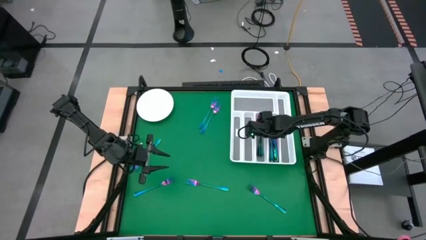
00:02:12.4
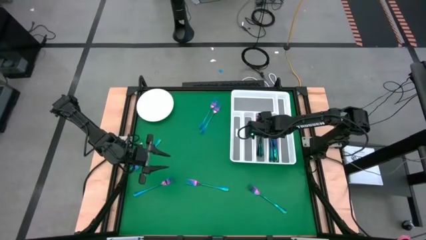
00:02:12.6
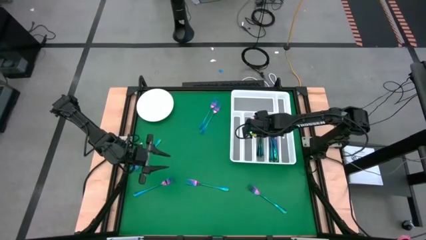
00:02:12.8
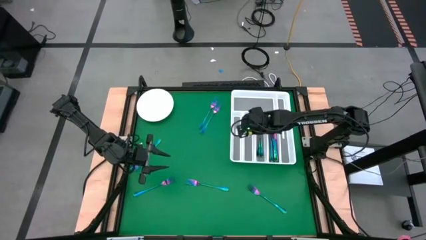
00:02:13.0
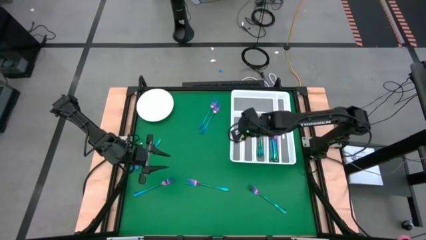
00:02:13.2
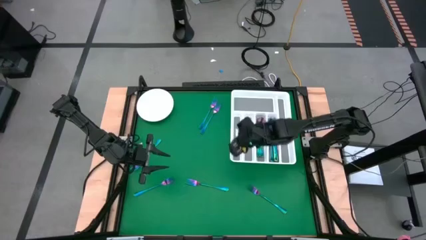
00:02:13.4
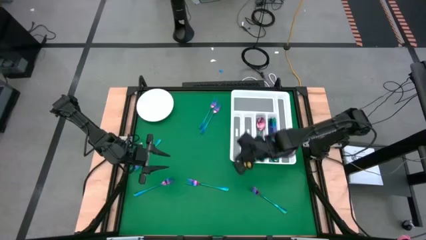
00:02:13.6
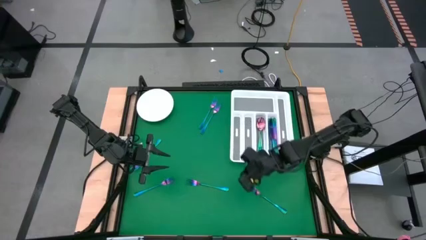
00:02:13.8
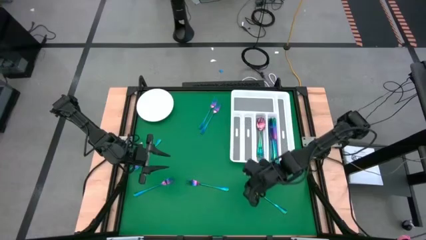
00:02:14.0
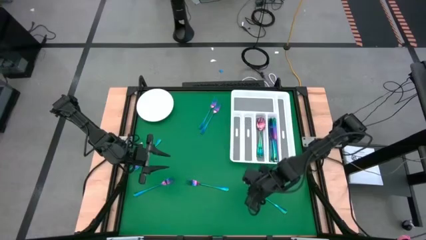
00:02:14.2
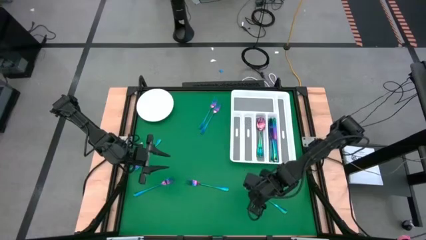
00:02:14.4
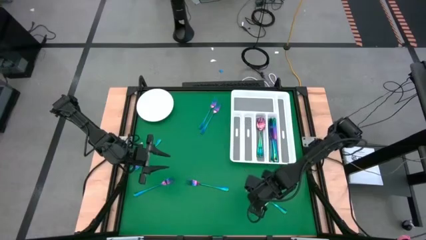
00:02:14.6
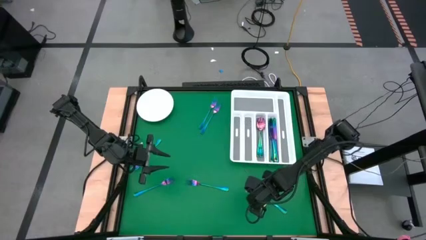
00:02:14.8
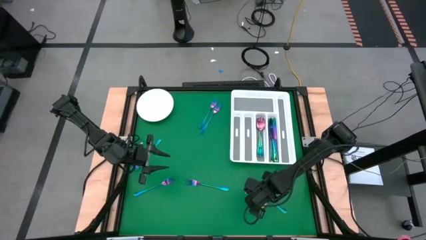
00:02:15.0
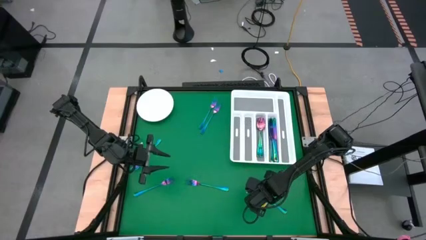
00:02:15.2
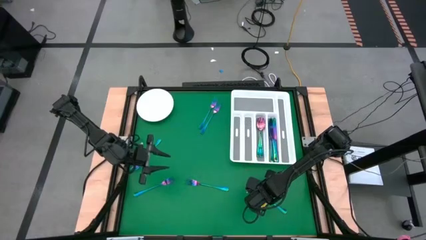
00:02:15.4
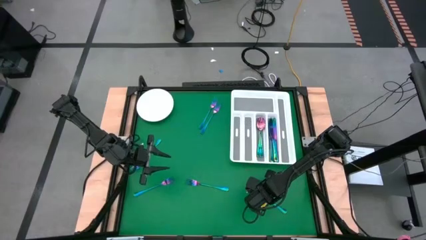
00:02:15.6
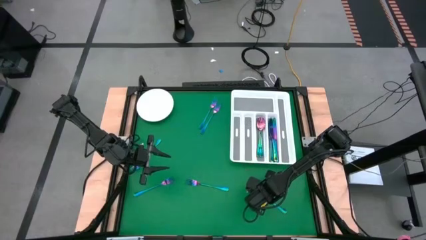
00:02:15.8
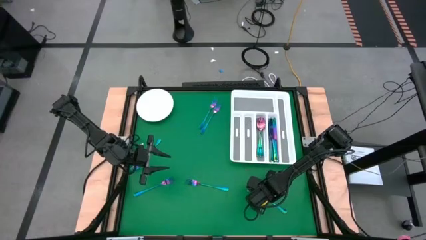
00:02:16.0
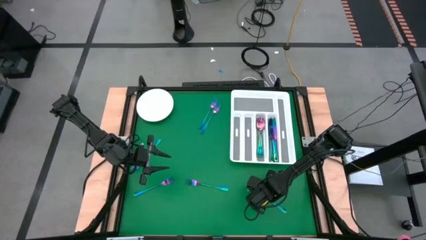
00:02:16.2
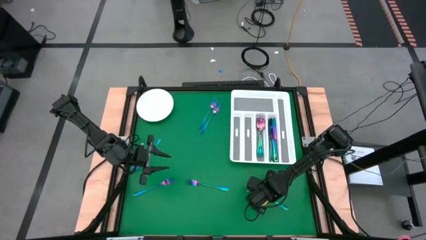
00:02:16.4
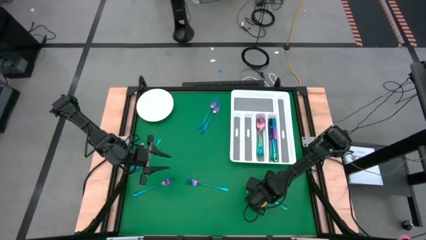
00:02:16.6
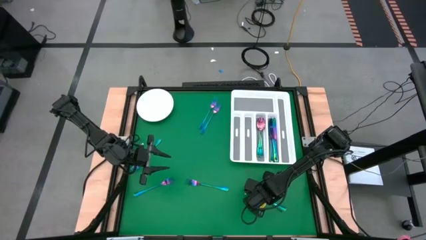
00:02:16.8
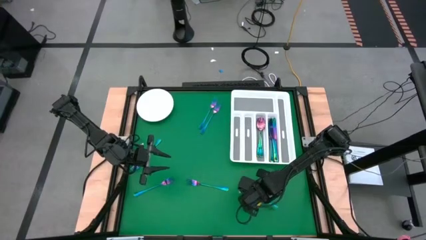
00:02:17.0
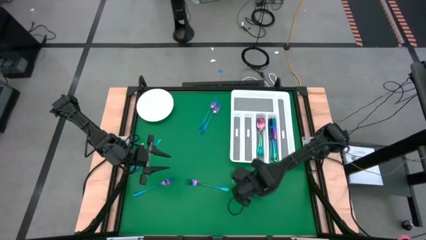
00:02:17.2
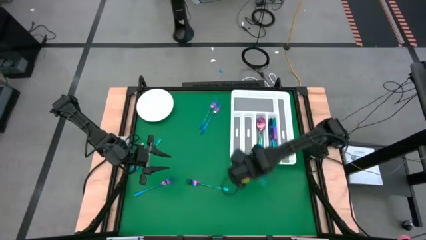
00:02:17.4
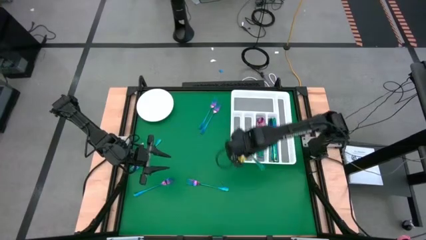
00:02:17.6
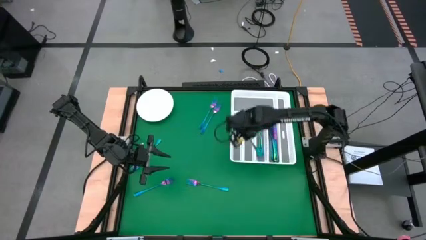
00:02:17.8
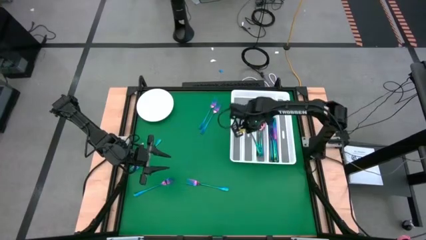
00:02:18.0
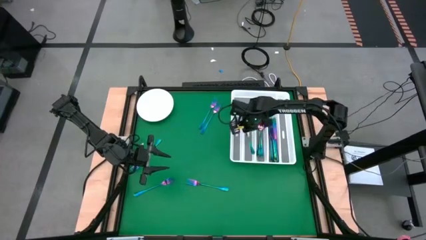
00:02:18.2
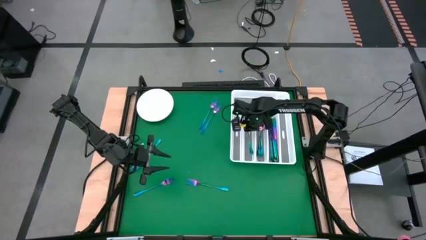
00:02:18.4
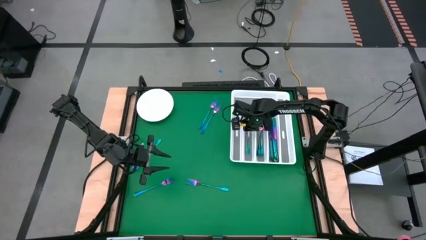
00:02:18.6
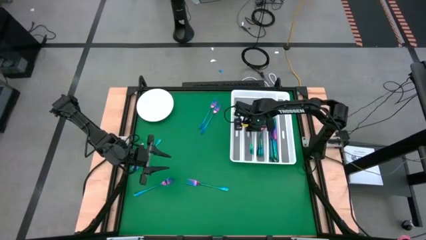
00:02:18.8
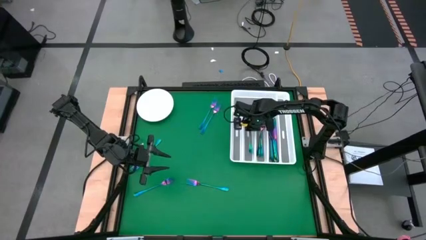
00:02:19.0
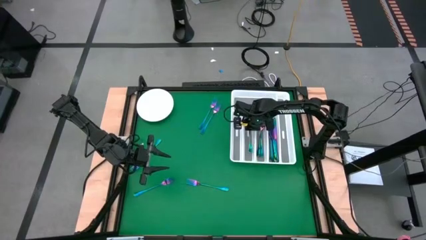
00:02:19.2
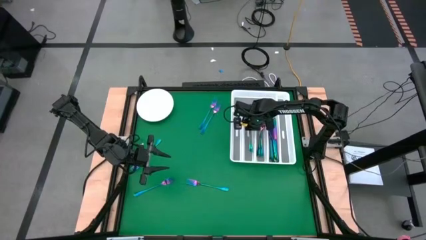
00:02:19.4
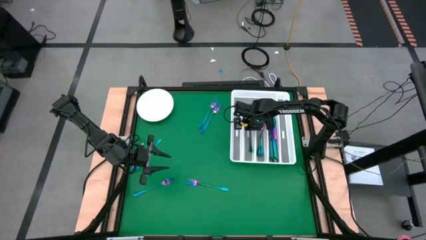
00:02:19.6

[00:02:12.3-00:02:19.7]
Task: Sort silverware
Put the blue fork into the white cutlery tray

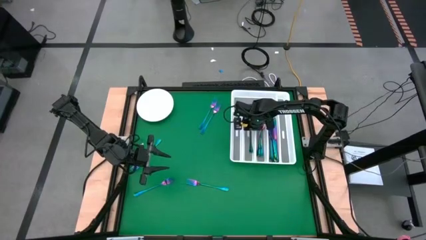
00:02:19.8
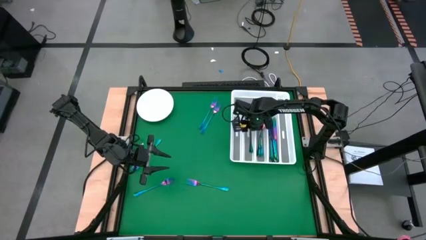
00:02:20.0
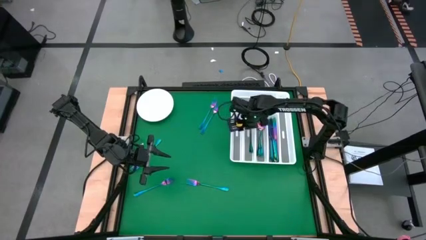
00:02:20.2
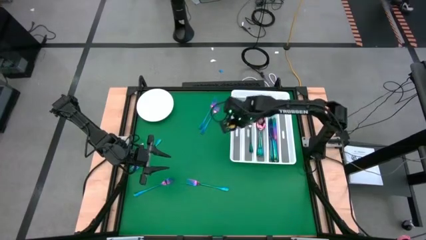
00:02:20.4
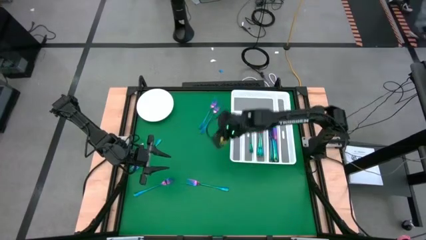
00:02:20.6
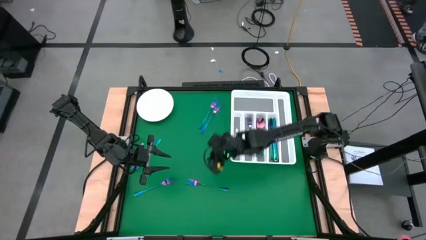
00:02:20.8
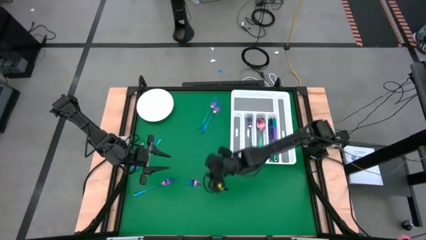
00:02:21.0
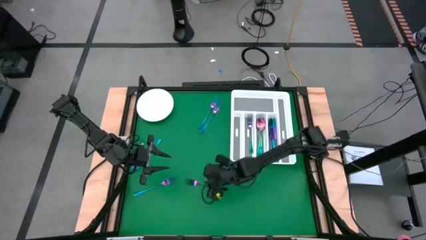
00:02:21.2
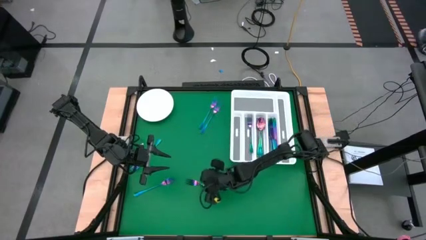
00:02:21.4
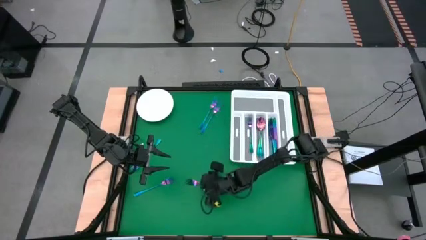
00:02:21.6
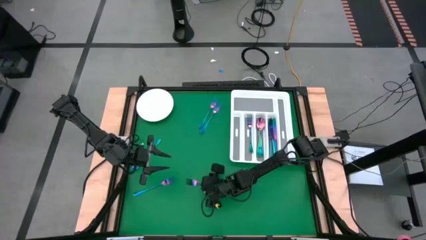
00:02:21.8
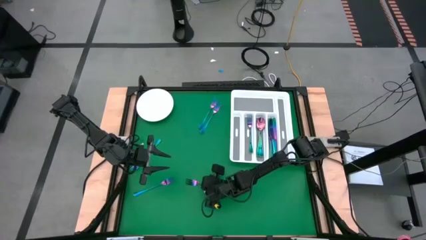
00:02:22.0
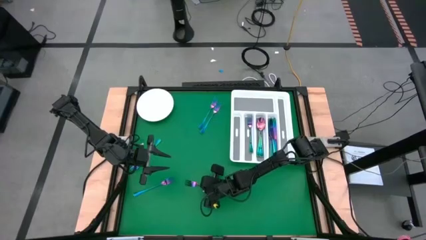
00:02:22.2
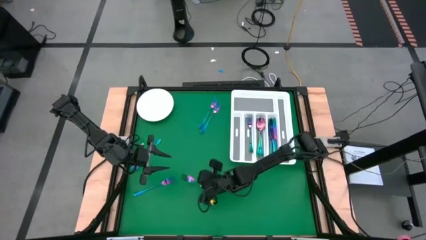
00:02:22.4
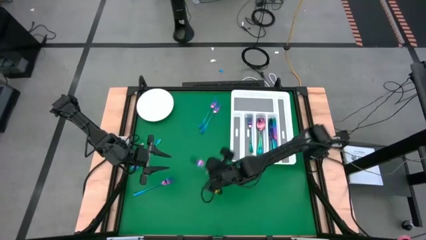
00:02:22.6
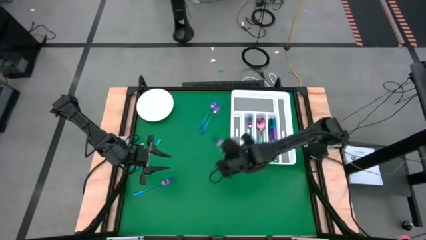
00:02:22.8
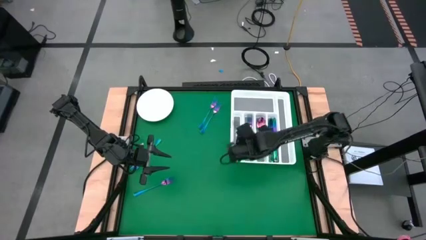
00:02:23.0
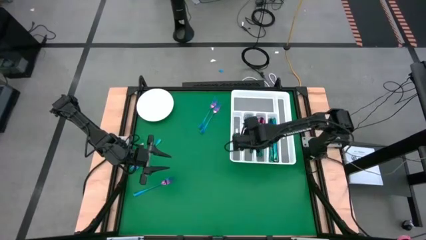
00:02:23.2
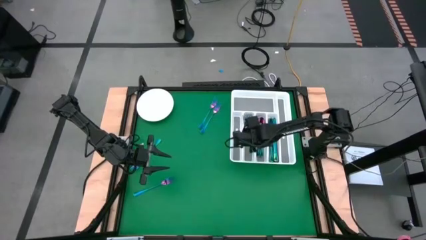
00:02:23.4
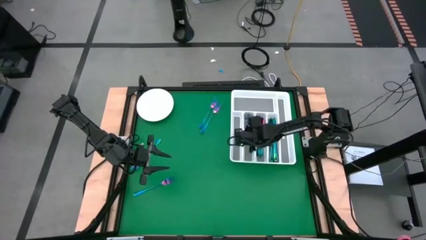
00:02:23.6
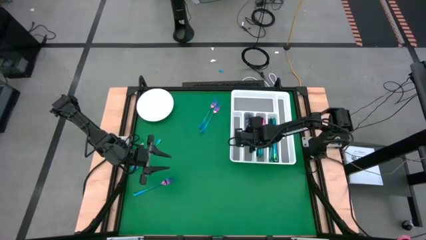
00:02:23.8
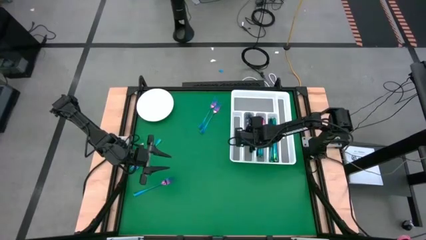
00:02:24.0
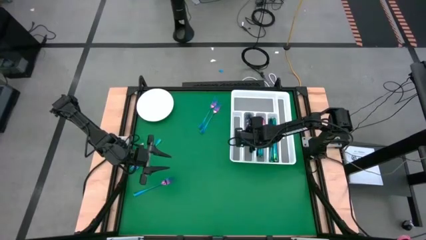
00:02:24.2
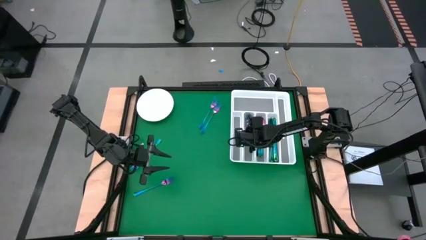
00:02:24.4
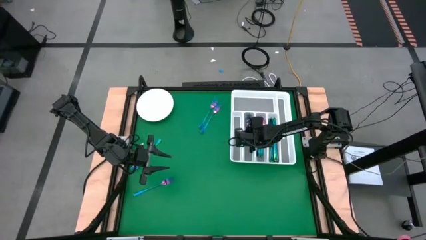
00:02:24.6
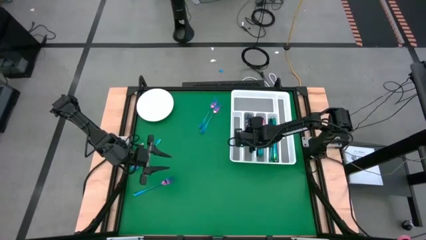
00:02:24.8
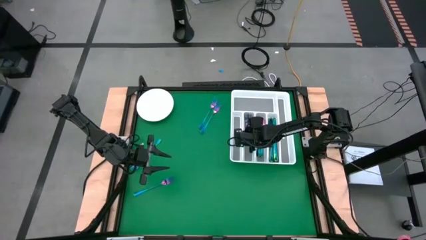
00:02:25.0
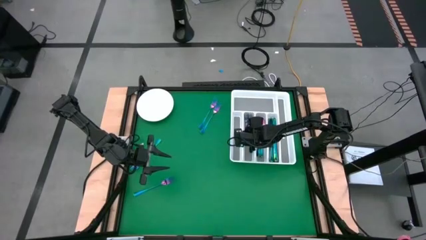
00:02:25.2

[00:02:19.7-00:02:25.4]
Put the blue fork into the white cutlery tray

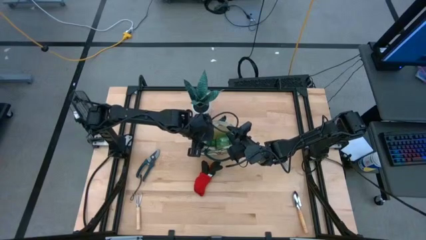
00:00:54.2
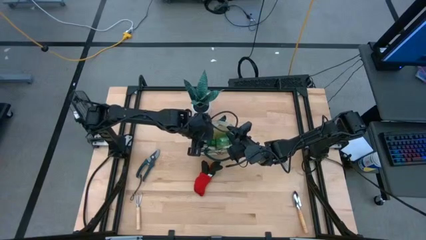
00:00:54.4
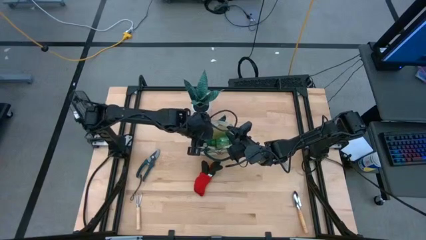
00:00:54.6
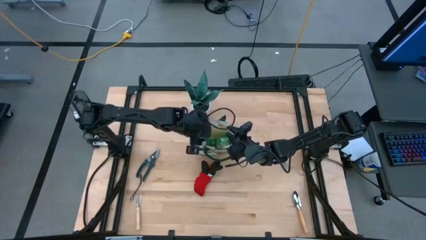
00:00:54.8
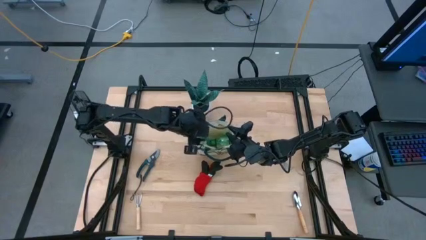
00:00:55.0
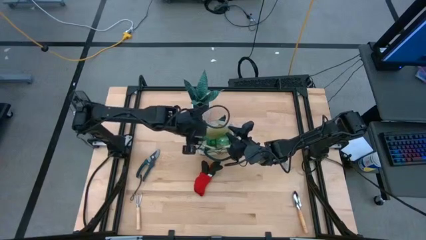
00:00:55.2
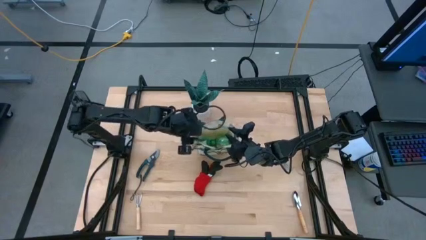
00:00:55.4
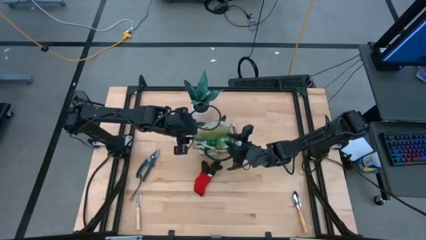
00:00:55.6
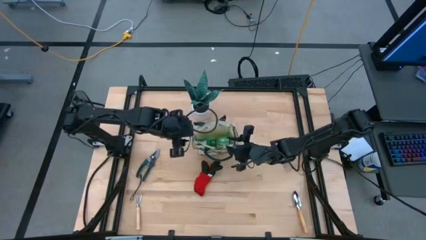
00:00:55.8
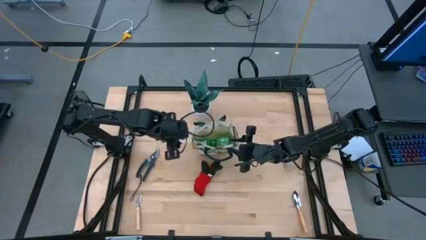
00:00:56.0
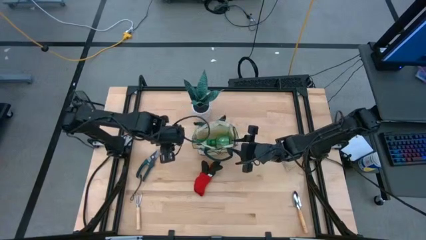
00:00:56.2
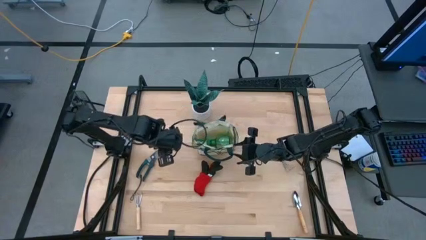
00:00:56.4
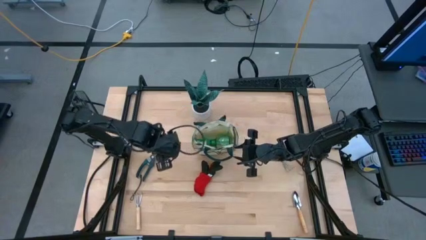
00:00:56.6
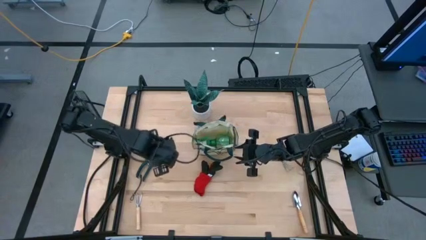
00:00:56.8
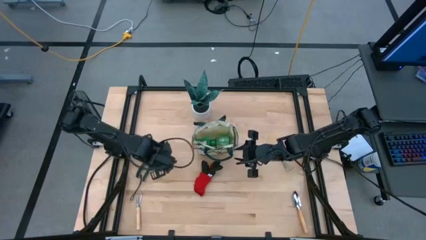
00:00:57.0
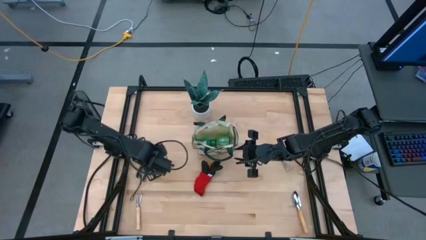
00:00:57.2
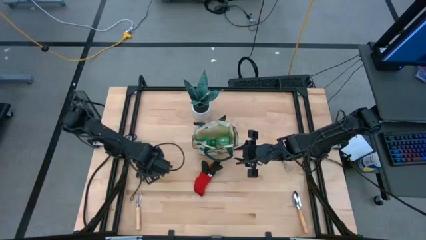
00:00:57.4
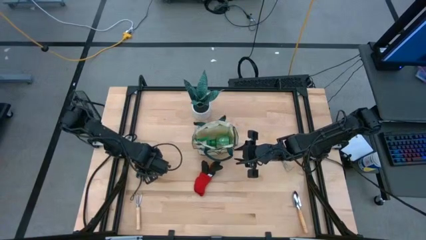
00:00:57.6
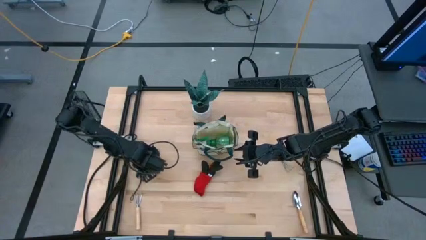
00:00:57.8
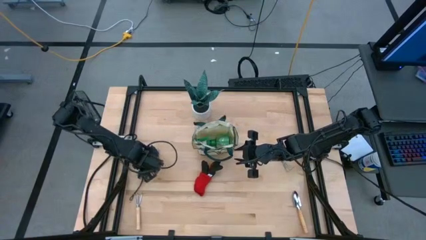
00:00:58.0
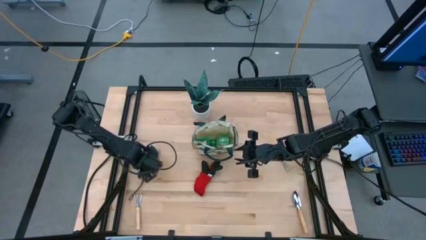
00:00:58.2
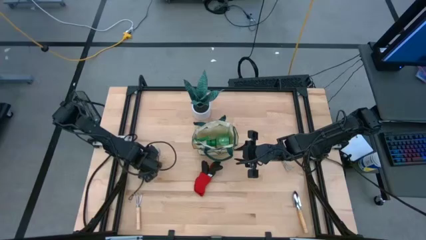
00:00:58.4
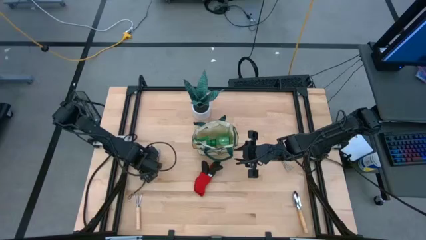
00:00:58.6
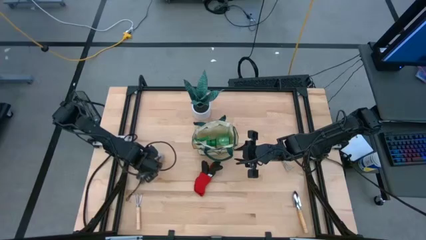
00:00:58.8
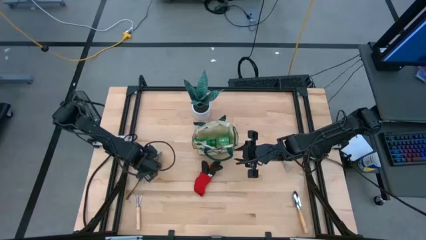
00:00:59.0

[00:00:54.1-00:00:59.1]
Task: Pick & Place Garden tools in Gardening bag
Put the green shear scissors into the gardening bag
